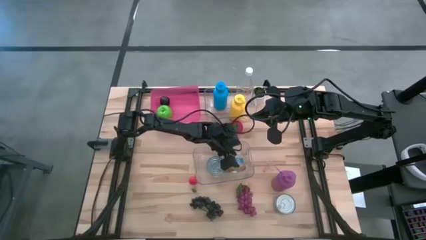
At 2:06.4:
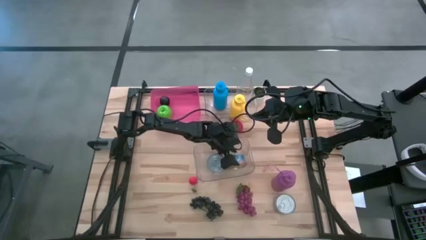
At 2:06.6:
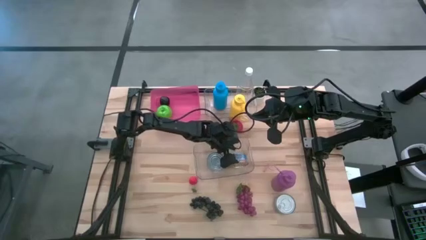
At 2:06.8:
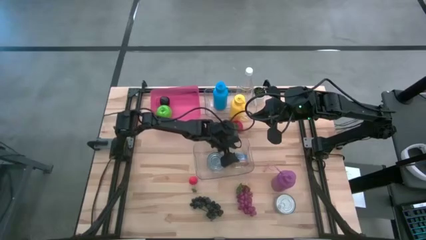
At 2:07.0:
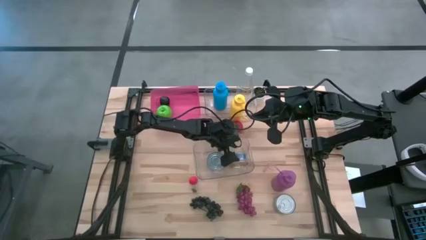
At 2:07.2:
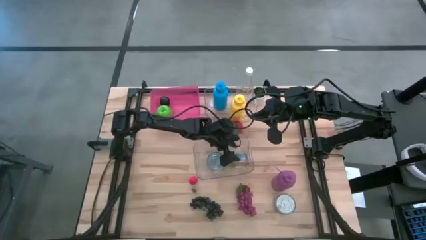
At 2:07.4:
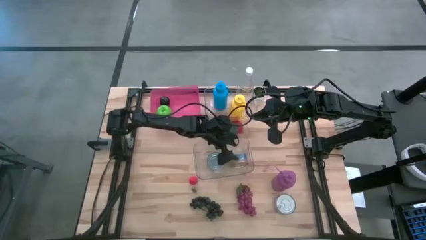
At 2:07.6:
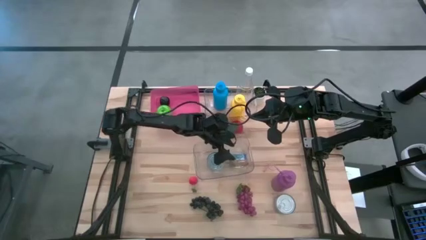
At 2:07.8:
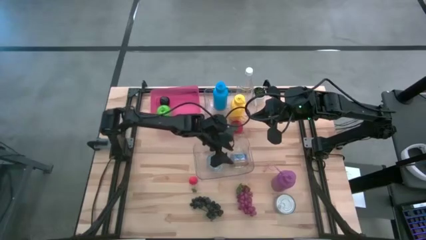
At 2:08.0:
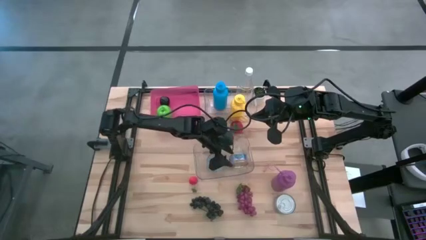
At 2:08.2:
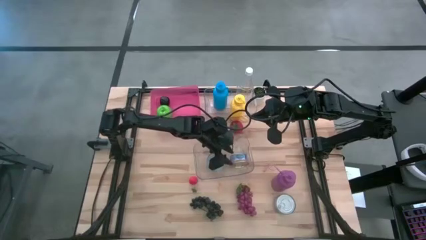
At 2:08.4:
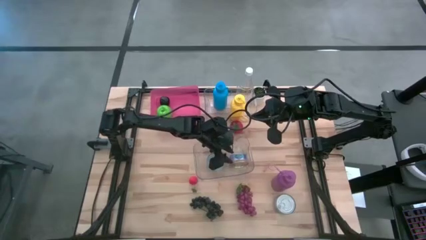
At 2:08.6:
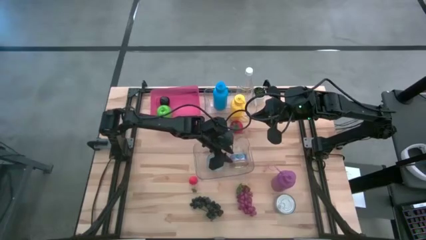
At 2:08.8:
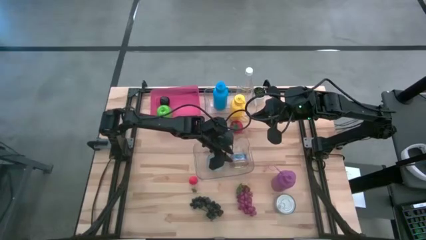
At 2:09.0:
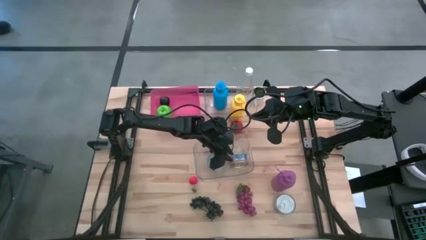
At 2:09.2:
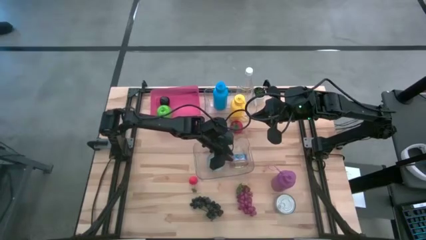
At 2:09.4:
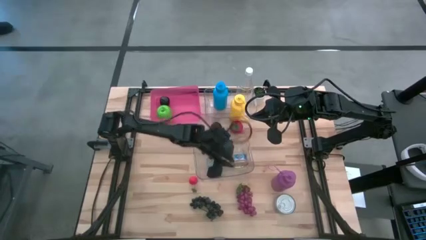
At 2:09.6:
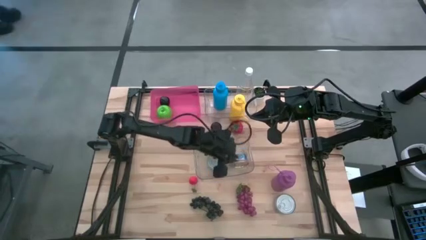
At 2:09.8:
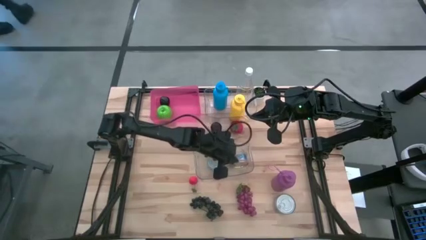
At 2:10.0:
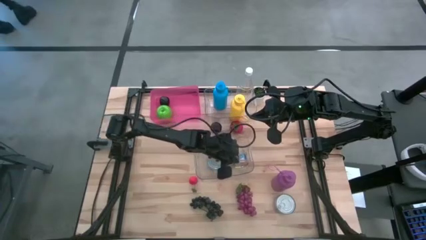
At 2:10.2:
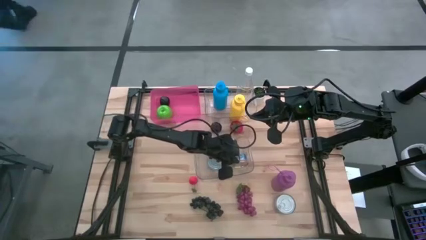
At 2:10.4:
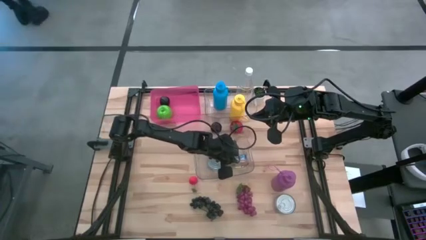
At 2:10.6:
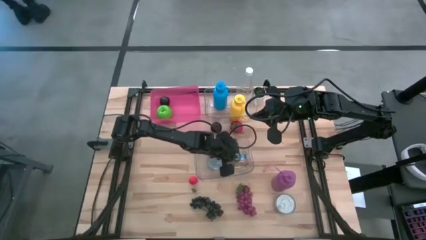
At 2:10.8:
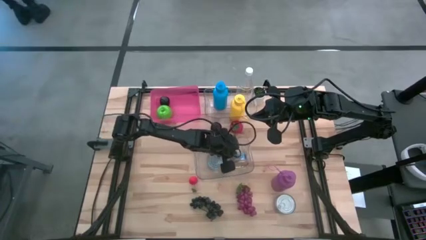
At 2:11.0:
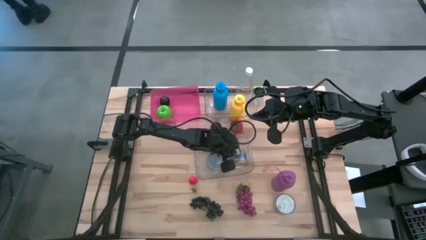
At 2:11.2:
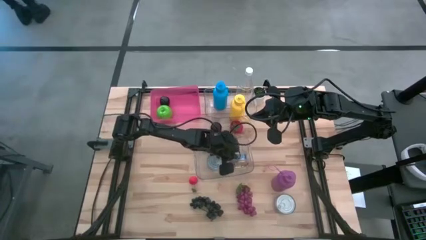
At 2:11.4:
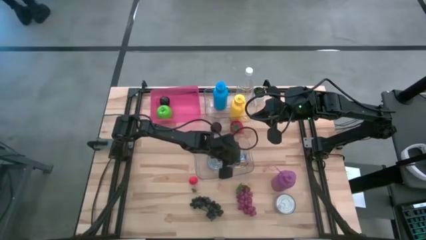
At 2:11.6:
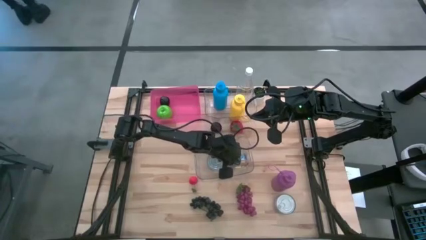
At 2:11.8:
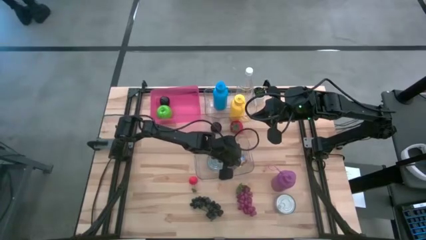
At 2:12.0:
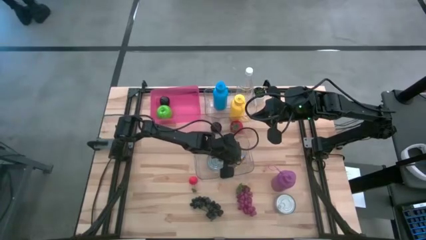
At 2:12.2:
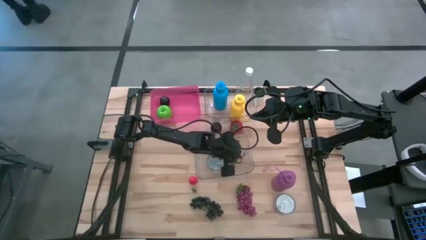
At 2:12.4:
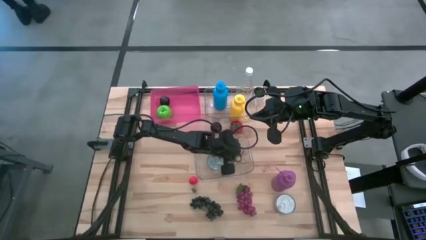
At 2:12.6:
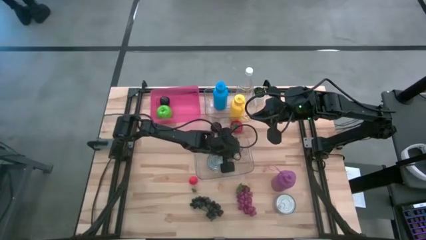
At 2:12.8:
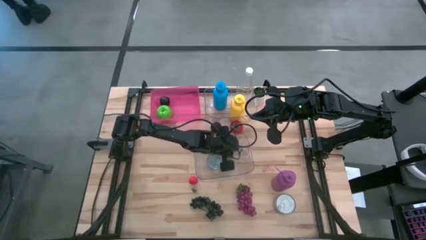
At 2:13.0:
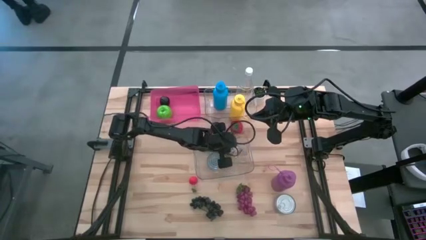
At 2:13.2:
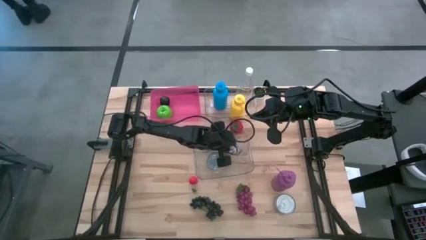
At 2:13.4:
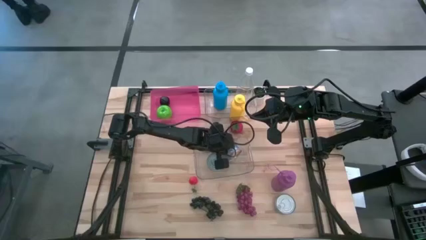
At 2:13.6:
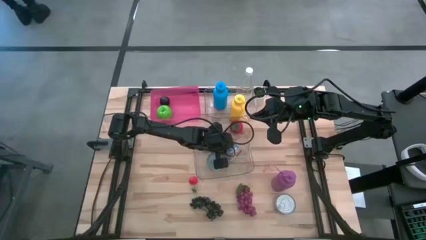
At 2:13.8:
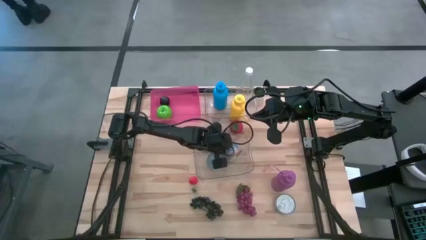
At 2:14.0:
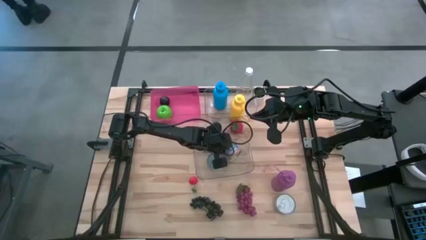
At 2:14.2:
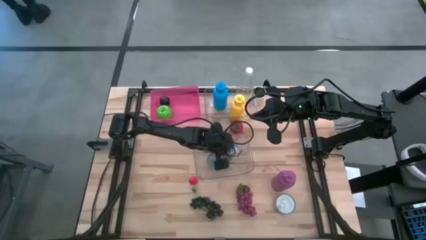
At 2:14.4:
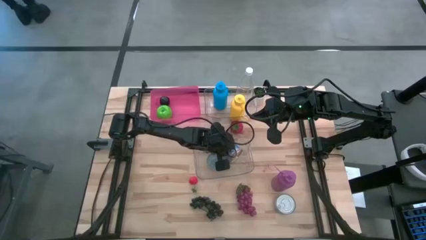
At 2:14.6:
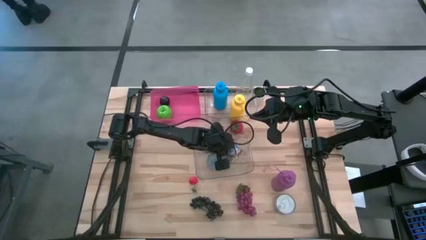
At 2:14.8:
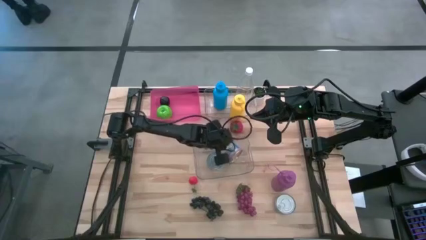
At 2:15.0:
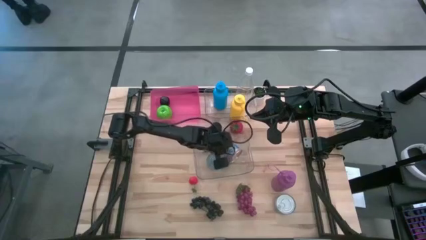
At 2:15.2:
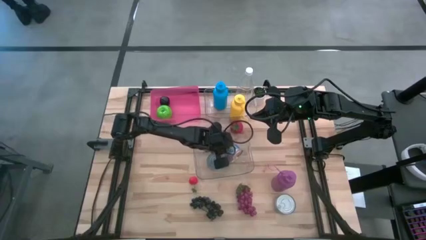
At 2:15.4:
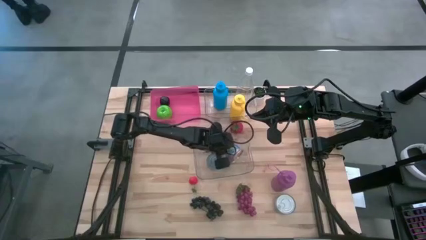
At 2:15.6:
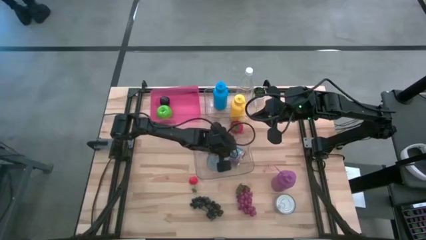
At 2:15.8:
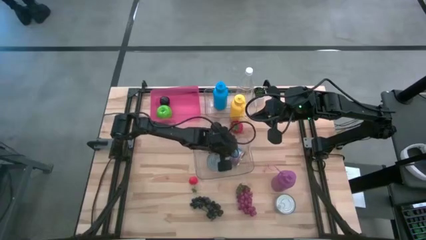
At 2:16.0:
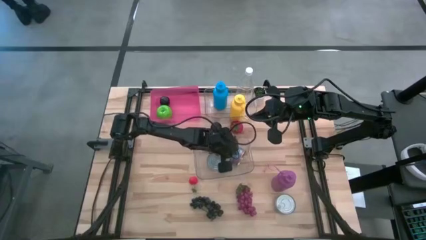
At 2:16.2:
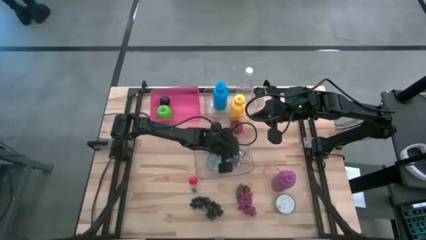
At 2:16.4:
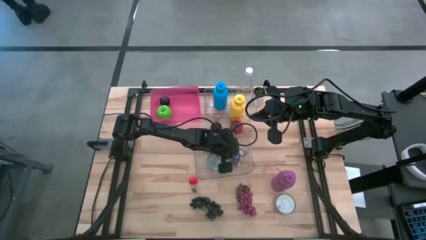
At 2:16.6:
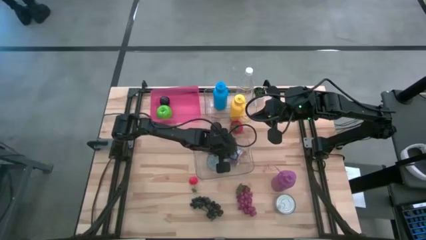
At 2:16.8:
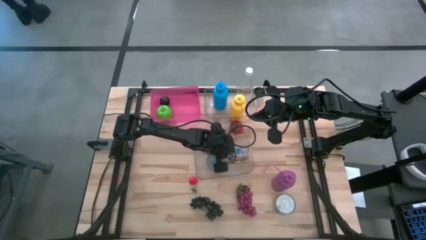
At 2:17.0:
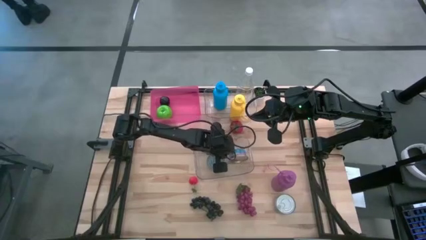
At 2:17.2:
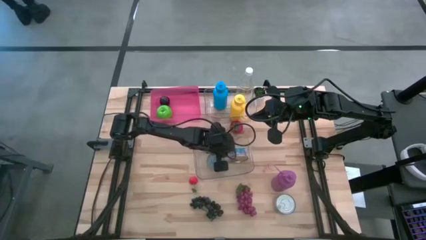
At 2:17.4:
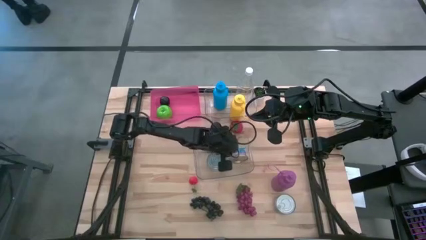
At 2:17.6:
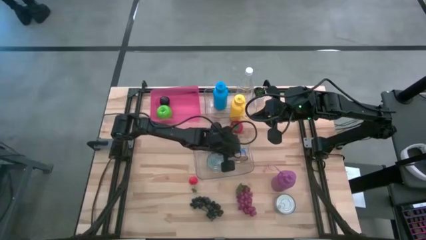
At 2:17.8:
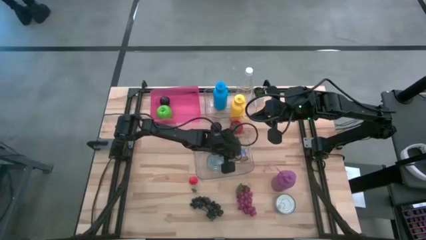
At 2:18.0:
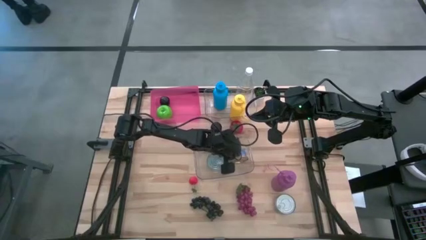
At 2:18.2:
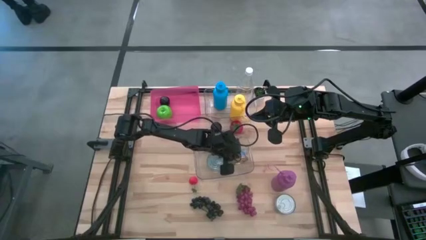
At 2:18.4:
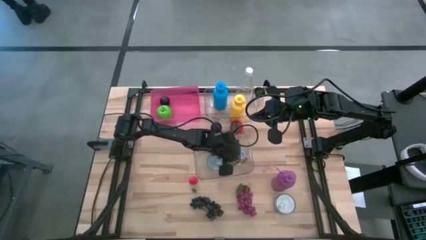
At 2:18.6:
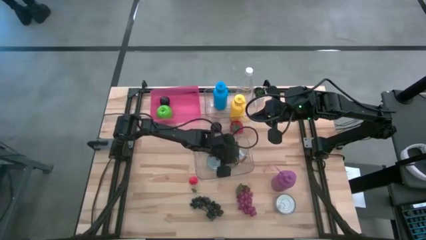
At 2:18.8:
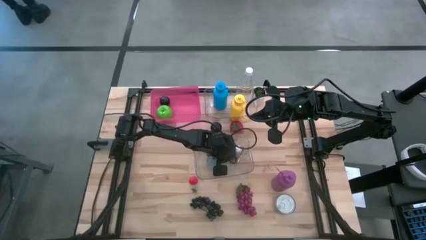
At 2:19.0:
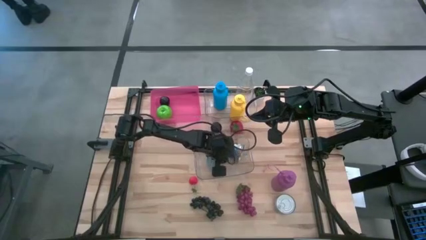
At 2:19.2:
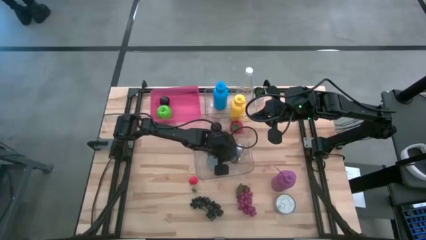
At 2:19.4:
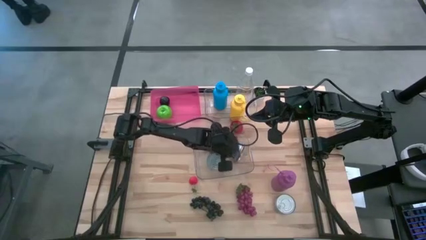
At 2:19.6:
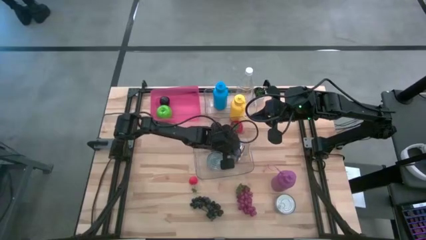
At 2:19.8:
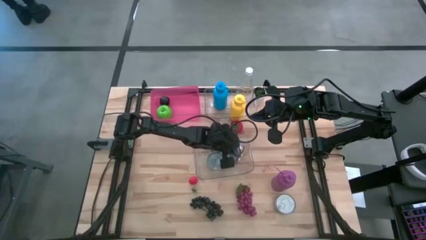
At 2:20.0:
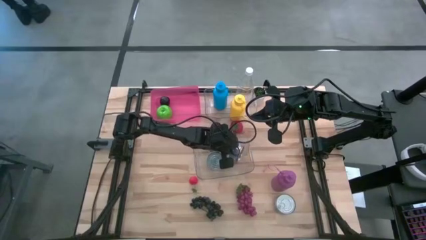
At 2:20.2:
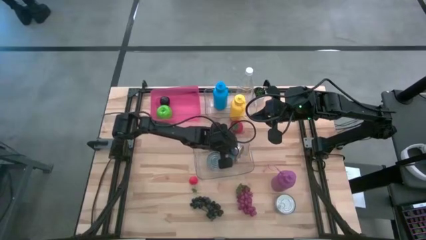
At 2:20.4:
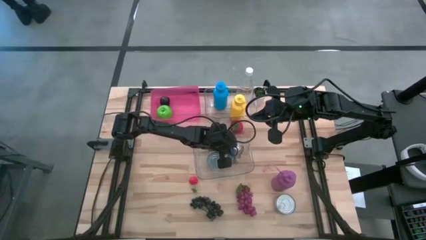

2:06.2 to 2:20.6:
Task: Pick & Place Food Item
Put the blue pink tuna can into the bottom transparent bin
